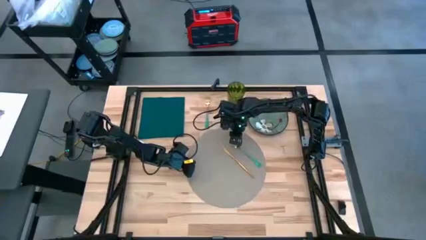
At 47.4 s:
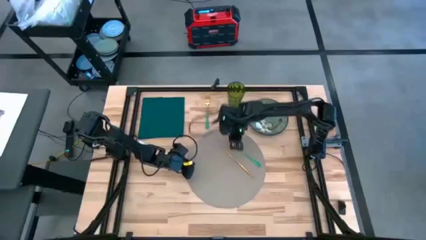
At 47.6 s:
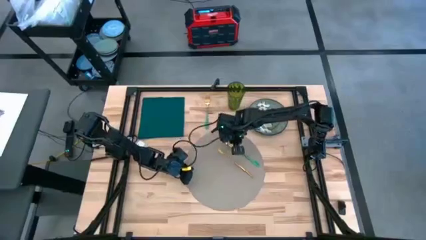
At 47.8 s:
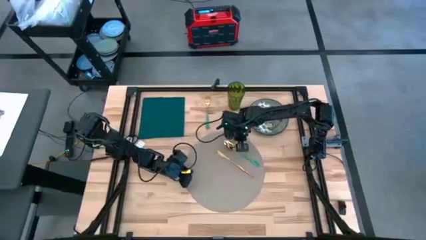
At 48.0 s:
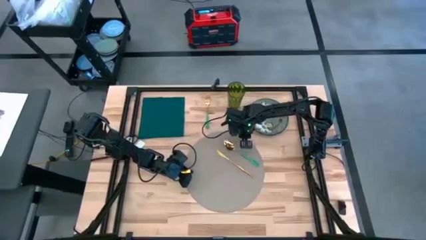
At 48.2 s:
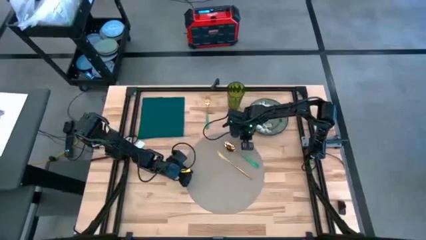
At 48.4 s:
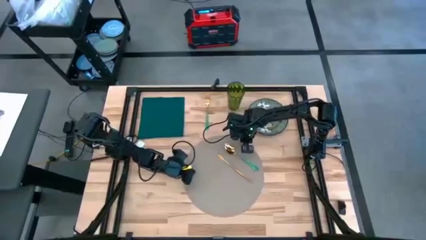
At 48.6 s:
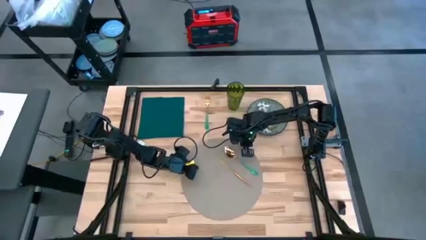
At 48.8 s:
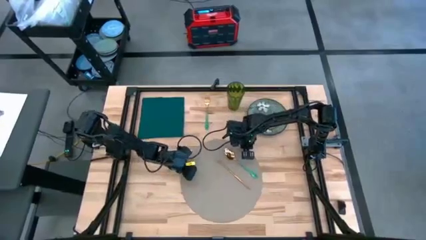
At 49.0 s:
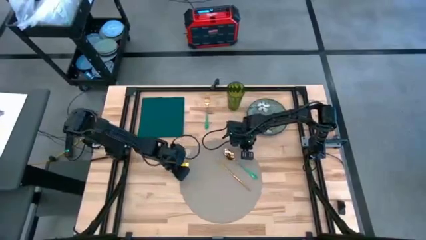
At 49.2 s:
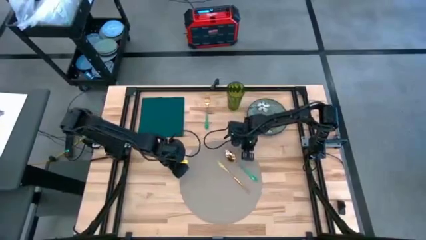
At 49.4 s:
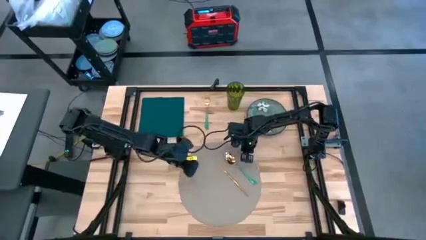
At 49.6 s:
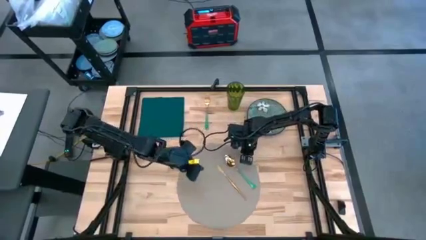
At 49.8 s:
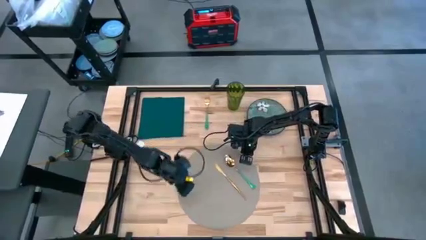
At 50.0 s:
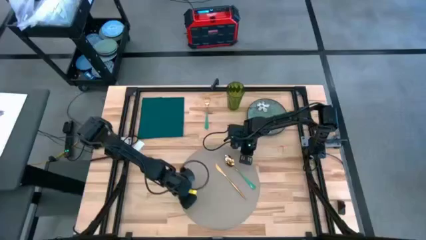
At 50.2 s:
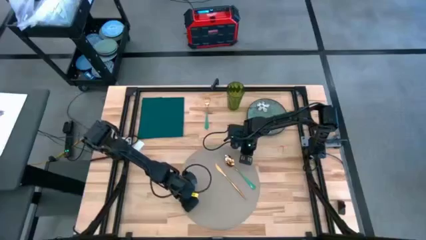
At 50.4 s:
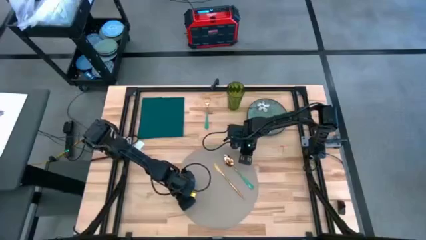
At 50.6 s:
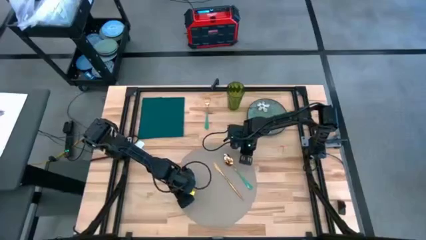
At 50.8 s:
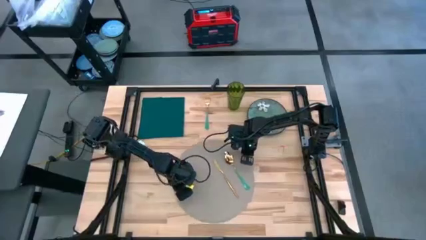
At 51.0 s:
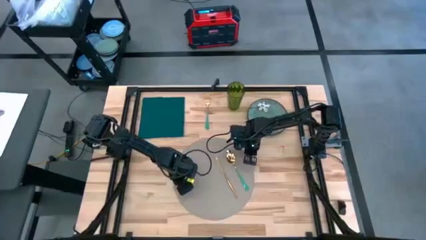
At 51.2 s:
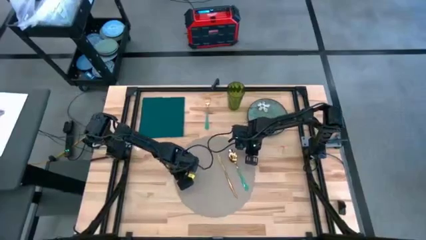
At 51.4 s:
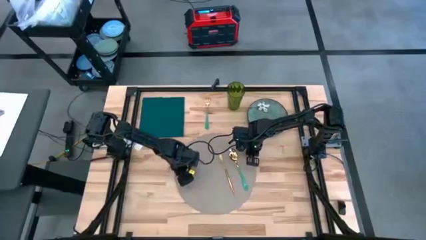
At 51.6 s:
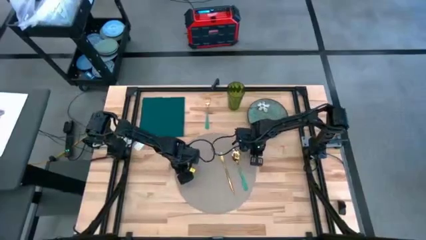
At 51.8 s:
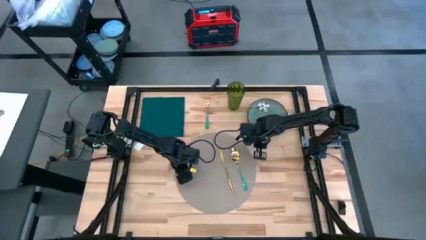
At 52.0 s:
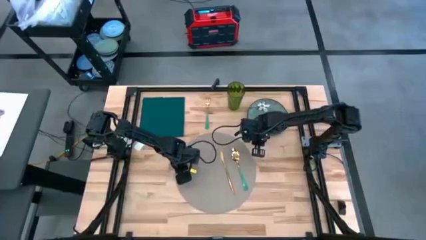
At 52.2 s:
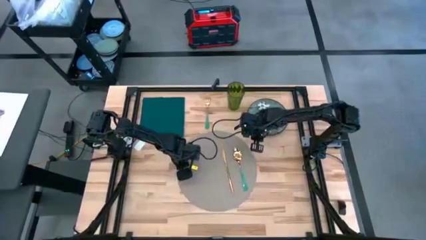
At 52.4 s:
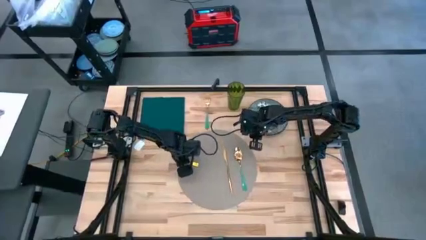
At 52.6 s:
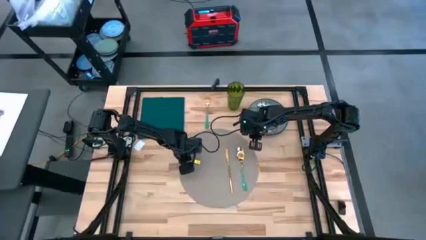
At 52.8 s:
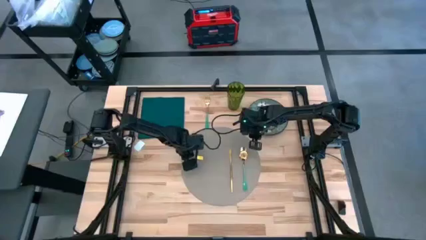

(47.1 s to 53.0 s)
Task: Set table place
Adjust the gray placemat

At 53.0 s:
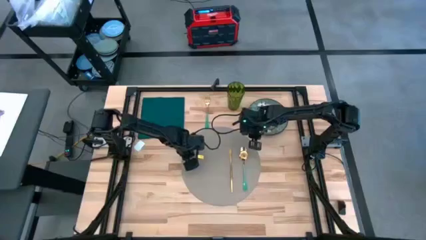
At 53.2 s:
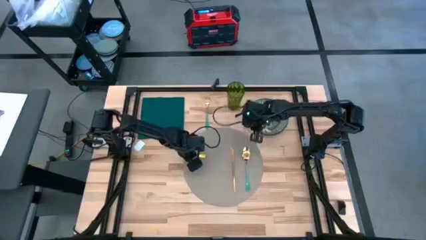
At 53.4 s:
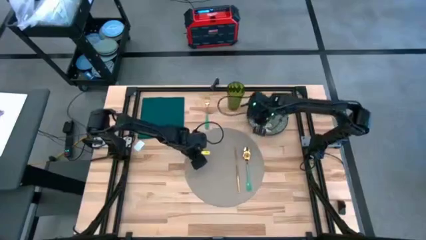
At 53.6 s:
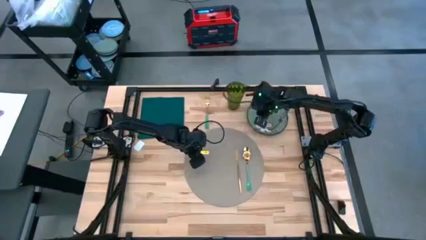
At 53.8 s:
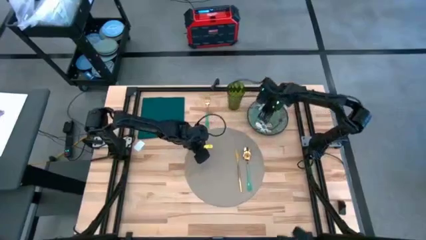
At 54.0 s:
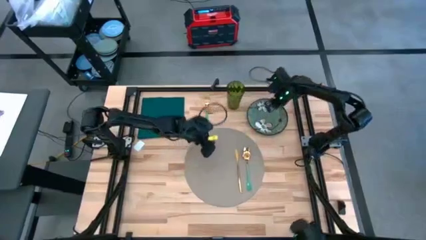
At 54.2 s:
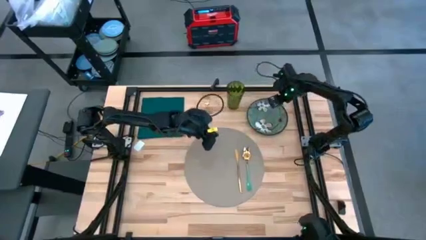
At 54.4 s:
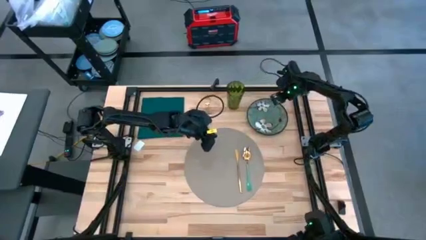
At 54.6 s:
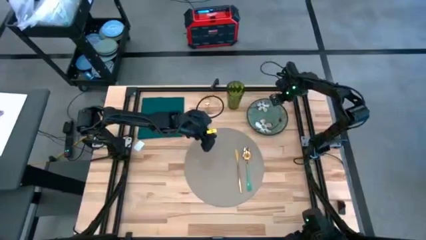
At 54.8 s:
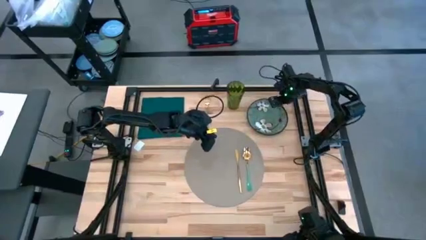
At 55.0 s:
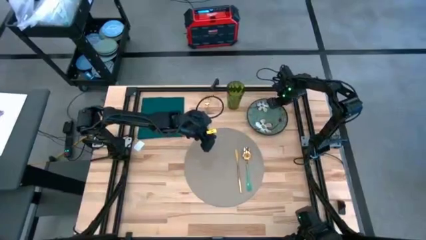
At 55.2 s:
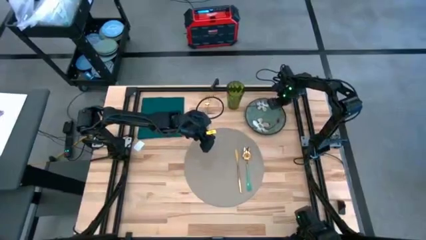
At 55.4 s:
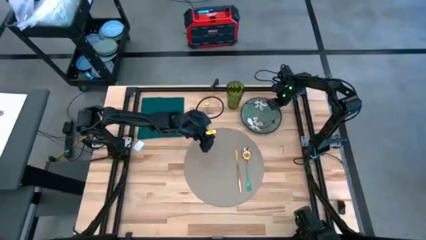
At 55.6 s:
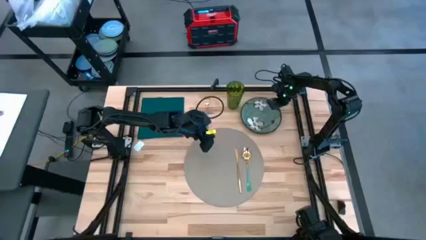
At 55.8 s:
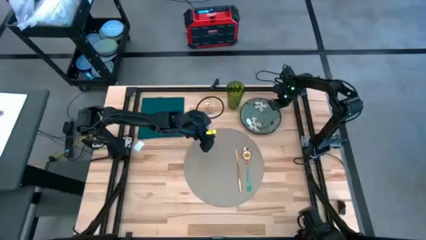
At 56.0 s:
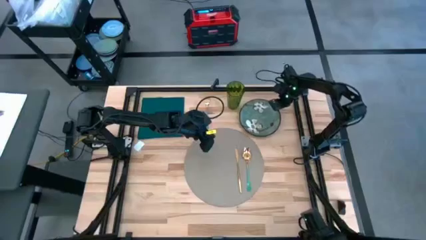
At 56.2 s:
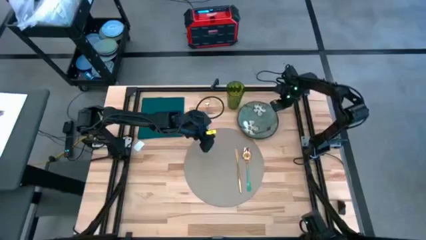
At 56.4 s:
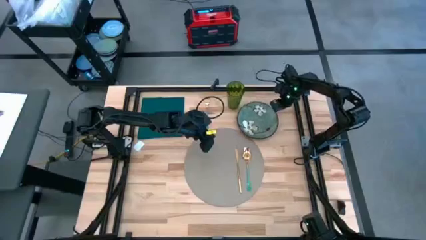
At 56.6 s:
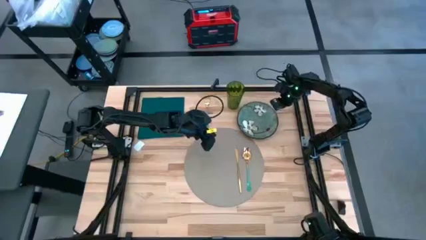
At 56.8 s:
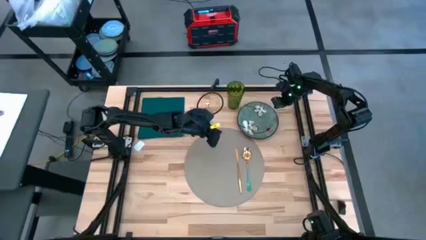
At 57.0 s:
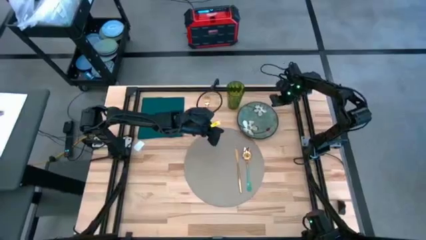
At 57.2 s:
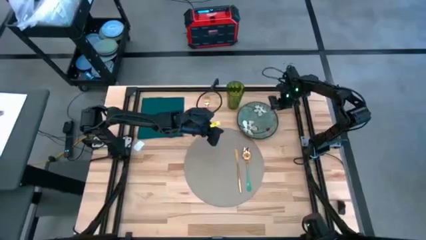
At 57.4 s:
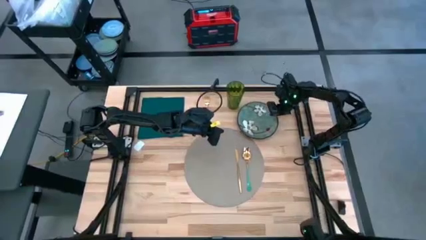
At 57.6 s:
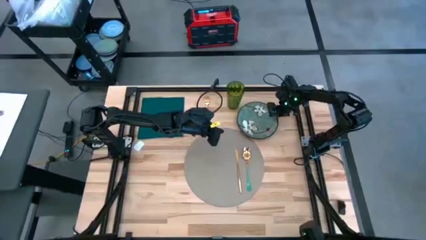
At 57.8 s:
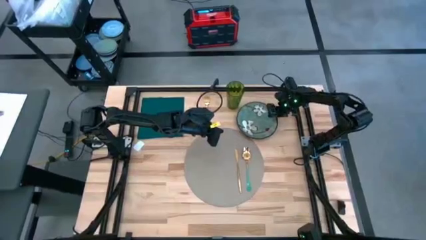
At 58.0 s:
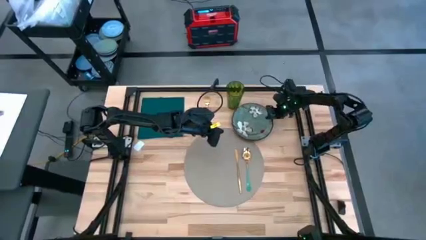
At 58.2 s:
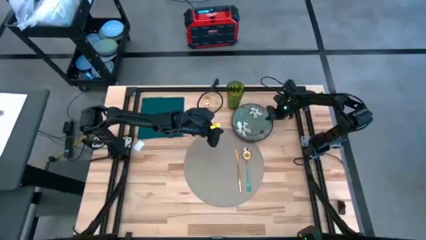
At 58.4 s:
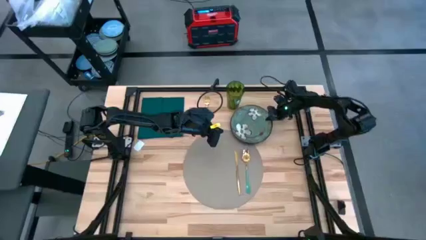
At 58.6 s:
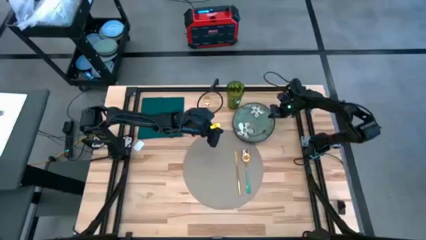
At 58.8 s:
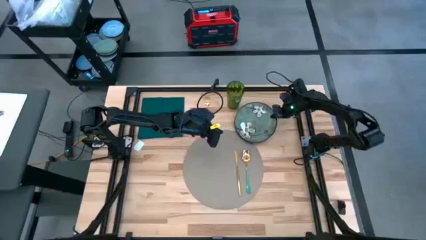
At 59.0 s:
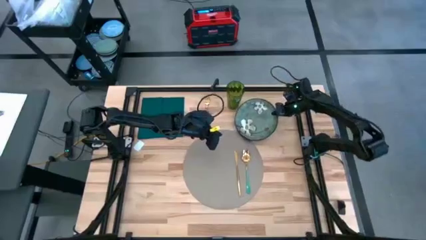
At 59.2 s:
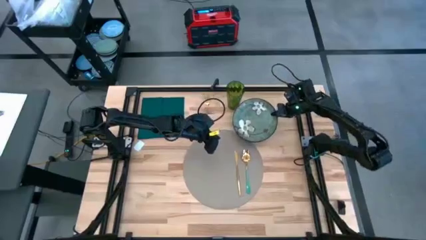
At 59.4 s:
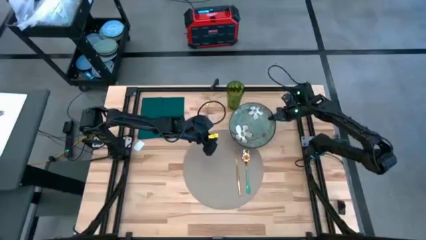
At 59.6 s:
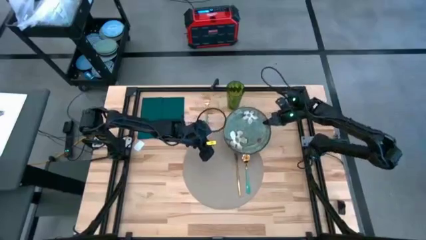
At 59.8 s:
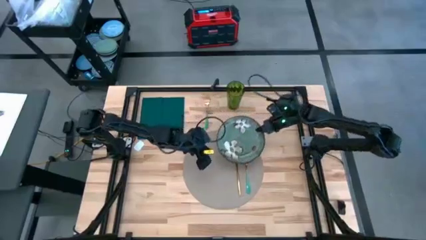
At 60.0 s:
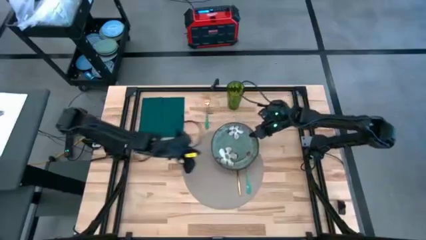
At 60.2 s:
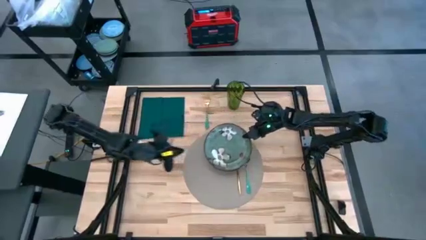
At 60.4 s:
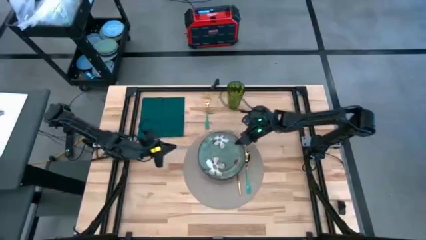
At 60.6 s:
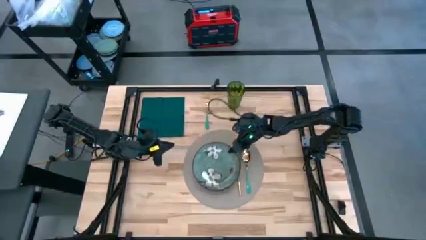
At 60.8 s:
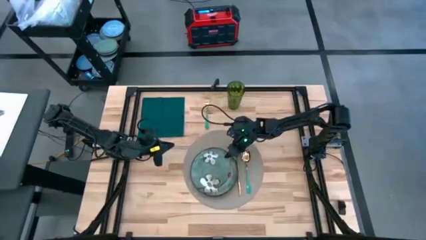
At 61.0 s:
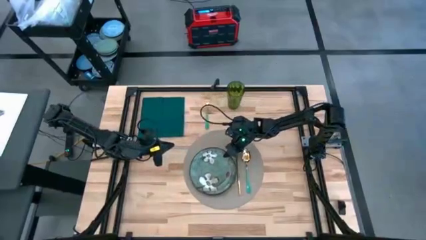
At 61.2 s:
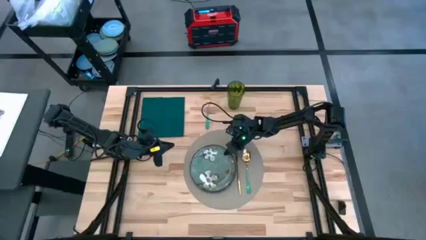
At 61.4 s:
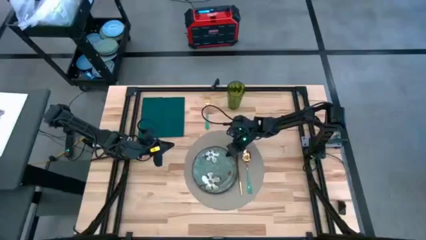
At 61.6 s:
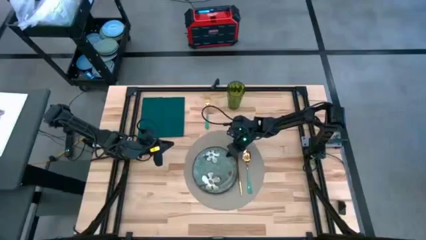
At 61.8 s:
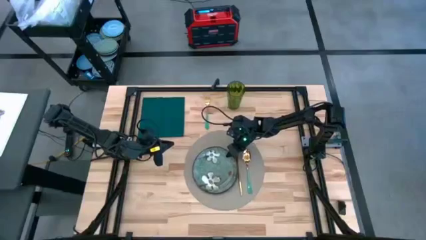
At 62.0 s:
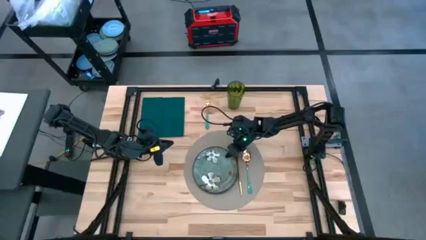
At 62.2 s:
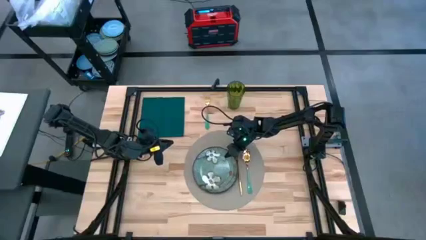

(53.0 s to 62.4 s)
Put the green plate on the gray placemat
